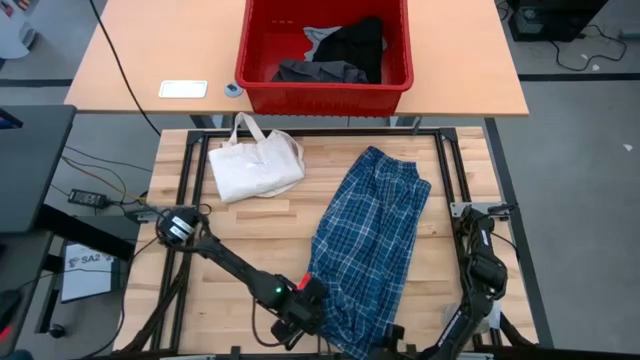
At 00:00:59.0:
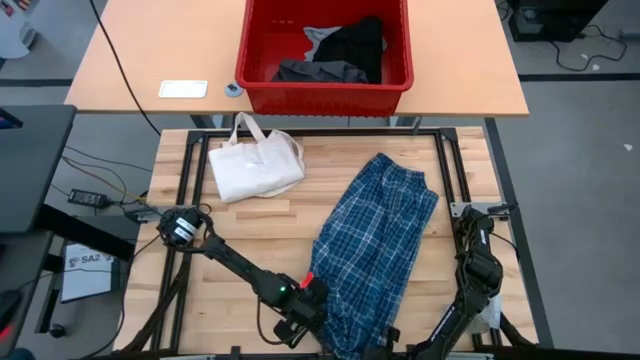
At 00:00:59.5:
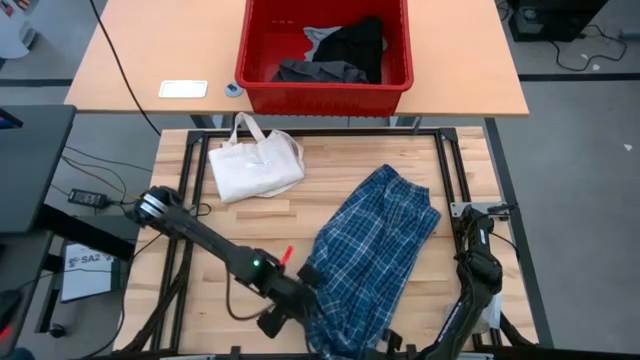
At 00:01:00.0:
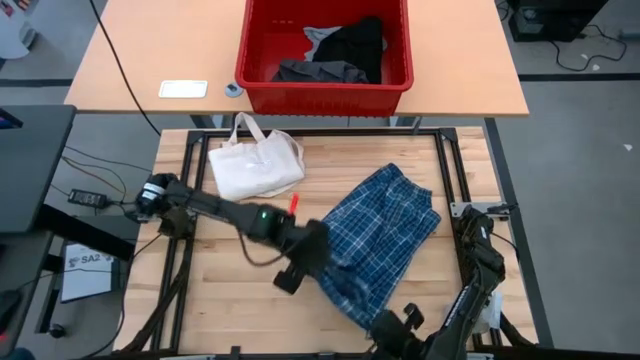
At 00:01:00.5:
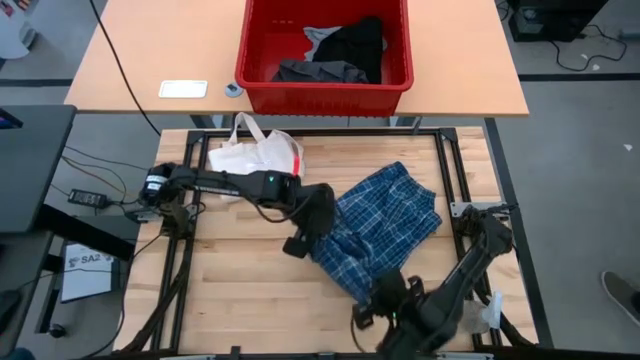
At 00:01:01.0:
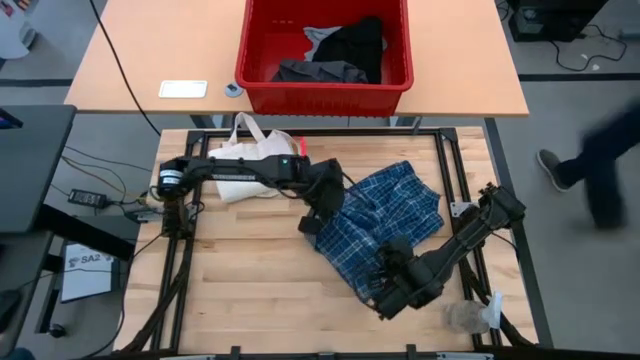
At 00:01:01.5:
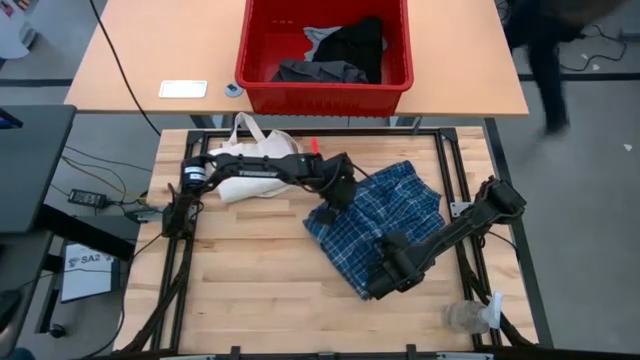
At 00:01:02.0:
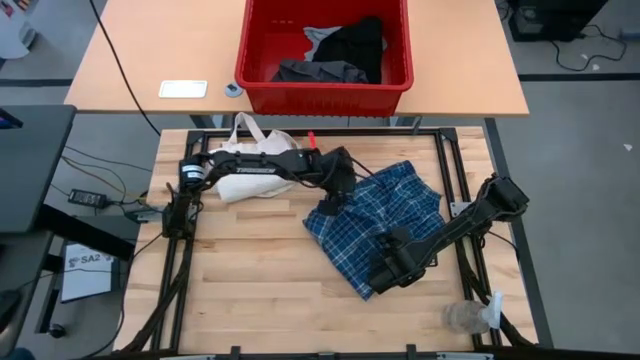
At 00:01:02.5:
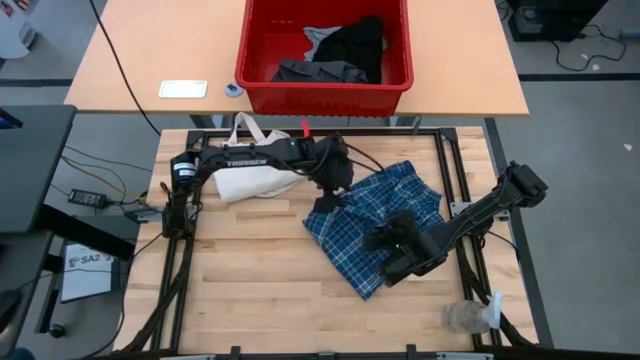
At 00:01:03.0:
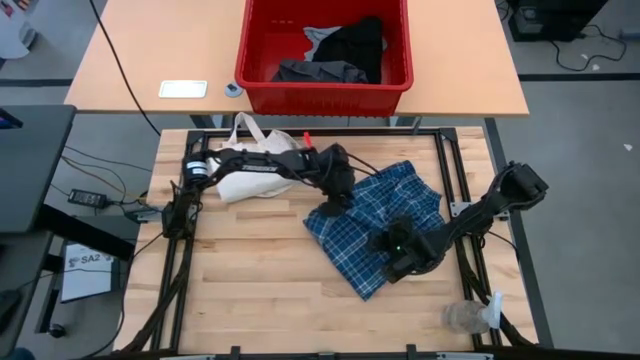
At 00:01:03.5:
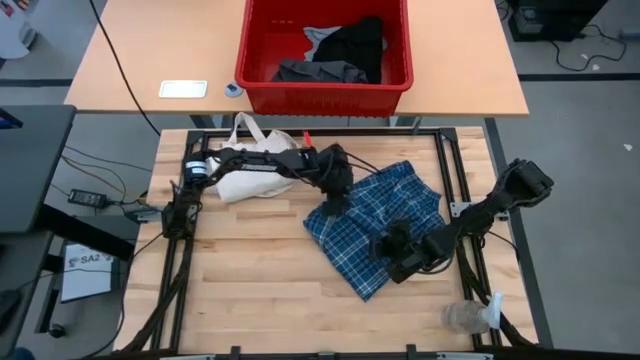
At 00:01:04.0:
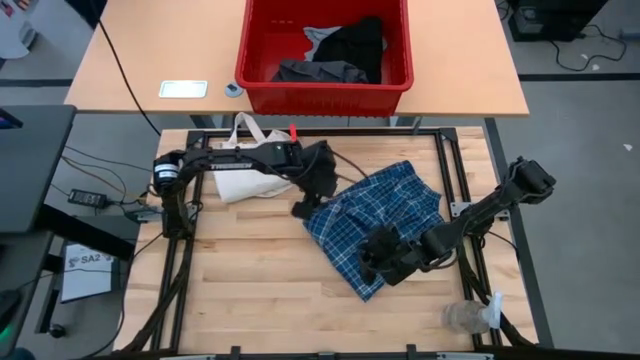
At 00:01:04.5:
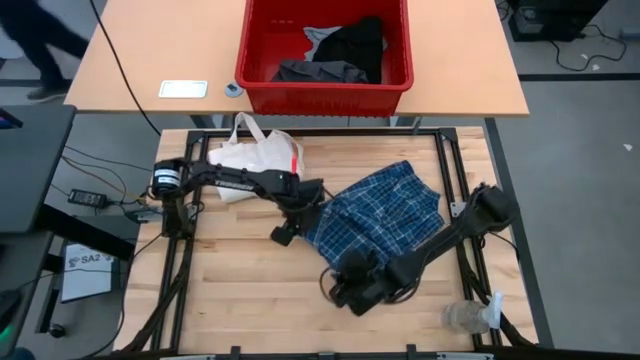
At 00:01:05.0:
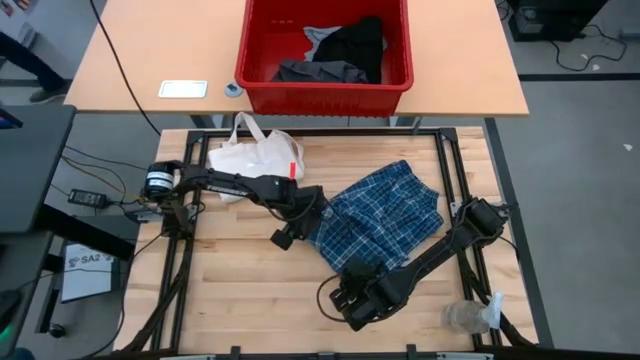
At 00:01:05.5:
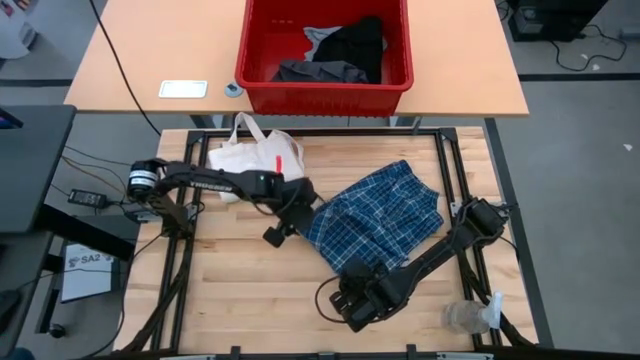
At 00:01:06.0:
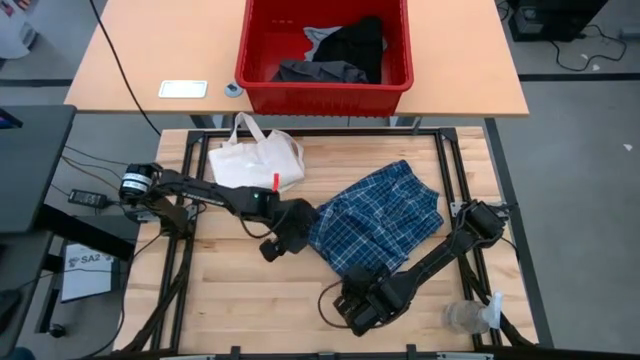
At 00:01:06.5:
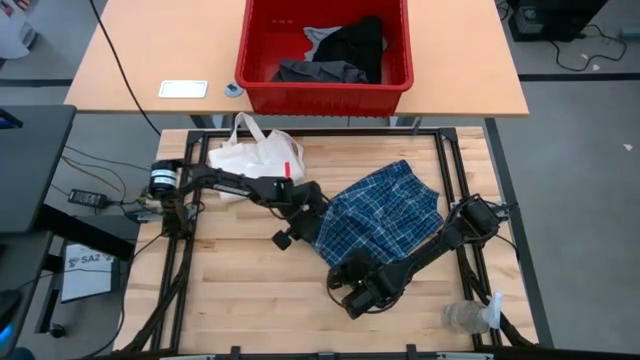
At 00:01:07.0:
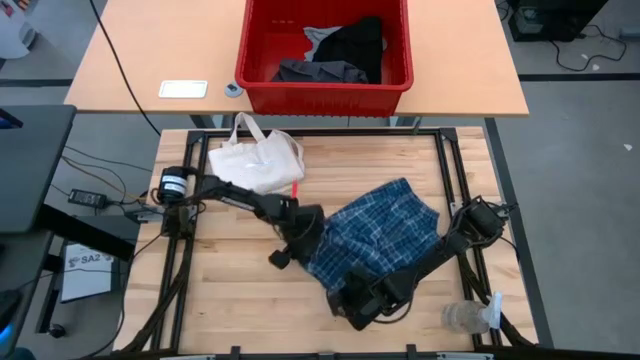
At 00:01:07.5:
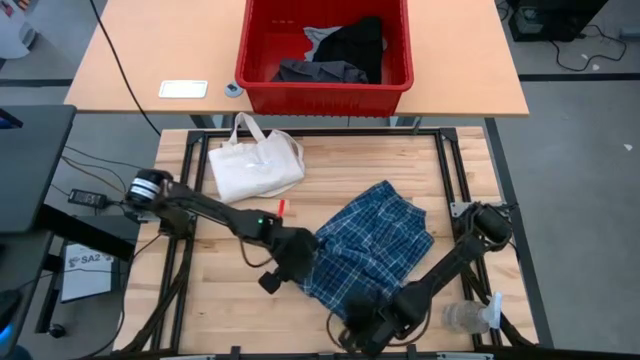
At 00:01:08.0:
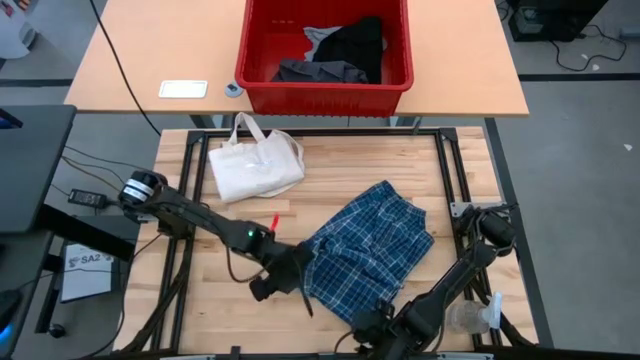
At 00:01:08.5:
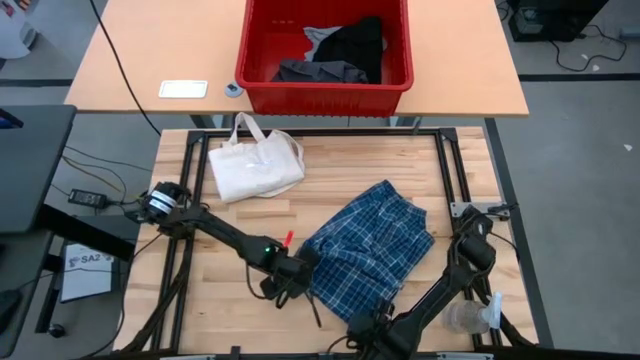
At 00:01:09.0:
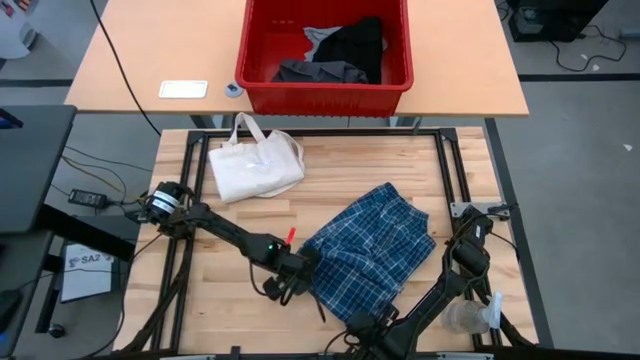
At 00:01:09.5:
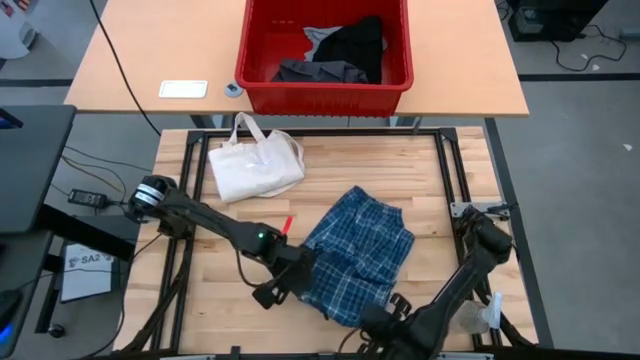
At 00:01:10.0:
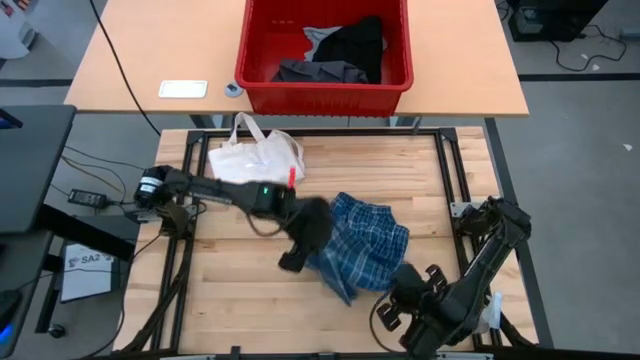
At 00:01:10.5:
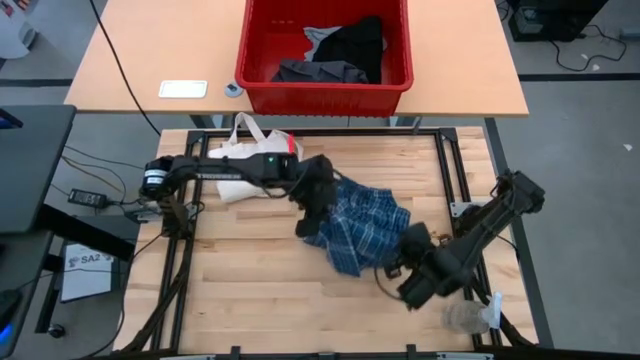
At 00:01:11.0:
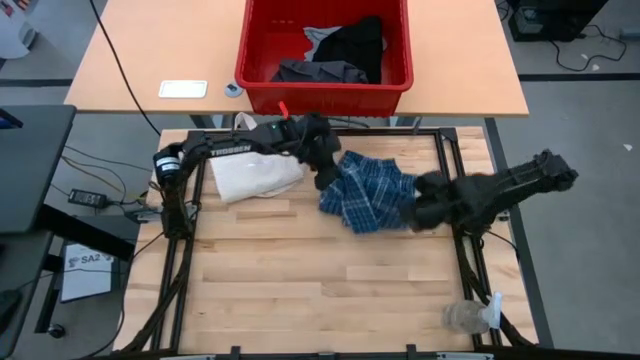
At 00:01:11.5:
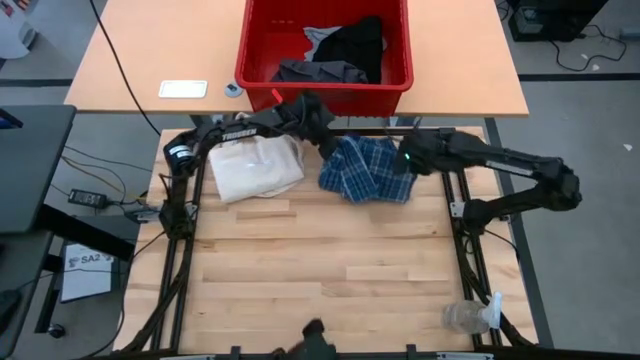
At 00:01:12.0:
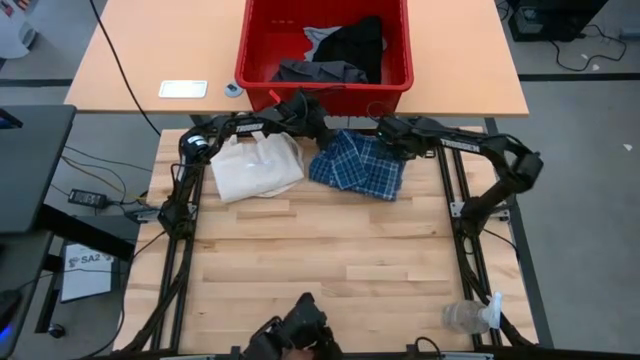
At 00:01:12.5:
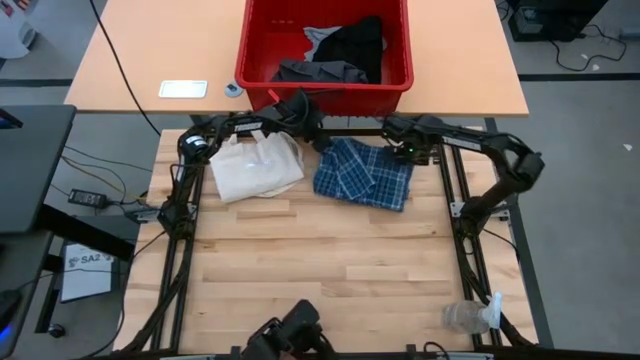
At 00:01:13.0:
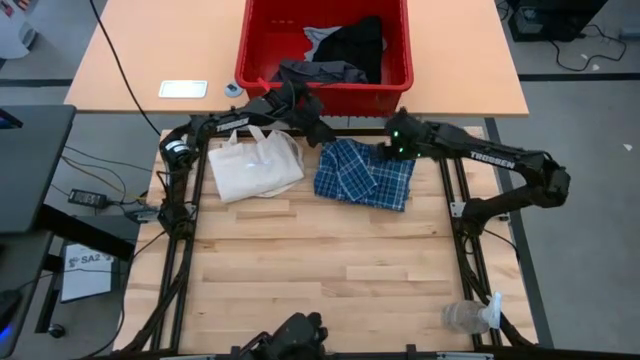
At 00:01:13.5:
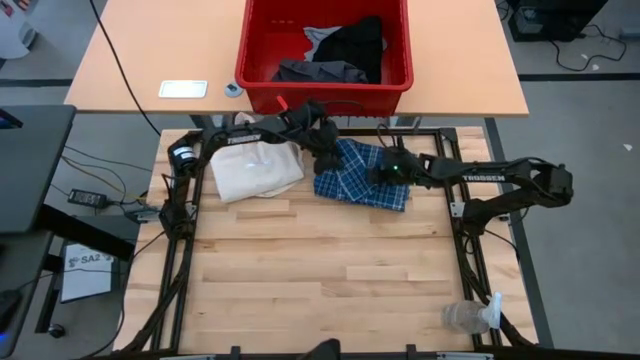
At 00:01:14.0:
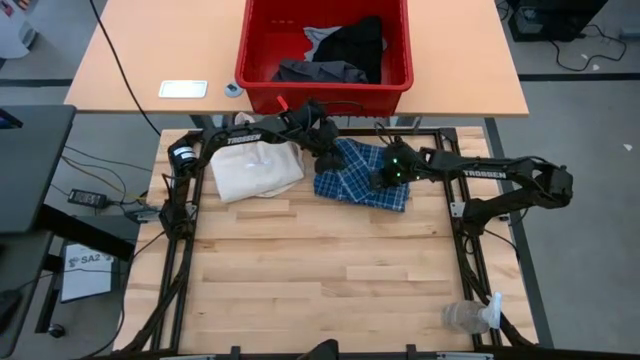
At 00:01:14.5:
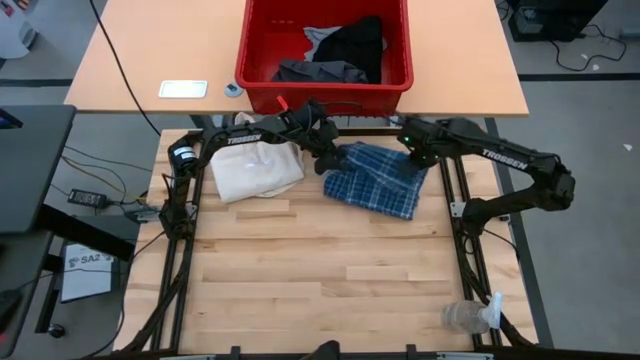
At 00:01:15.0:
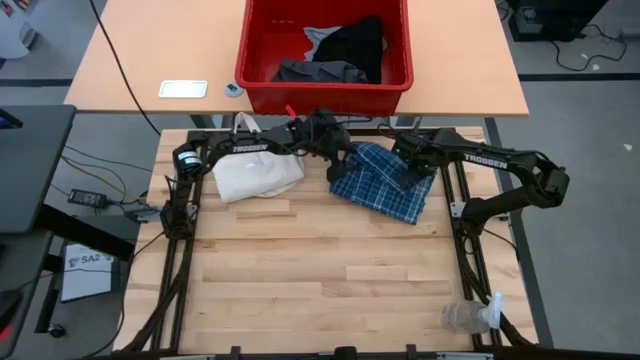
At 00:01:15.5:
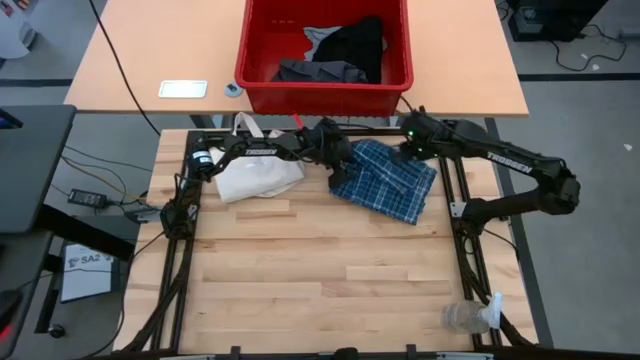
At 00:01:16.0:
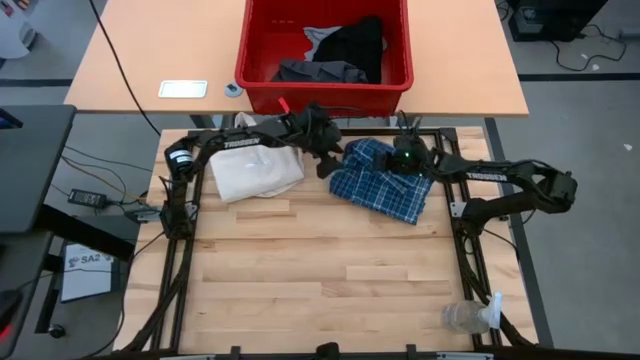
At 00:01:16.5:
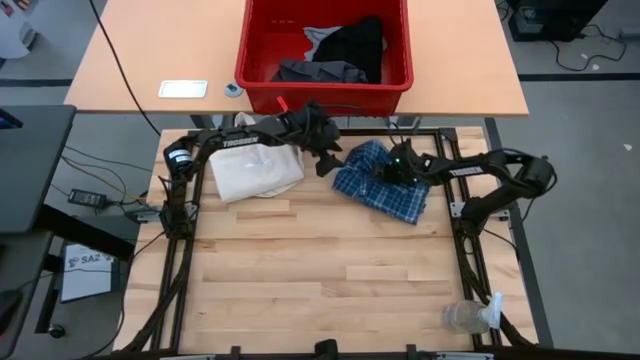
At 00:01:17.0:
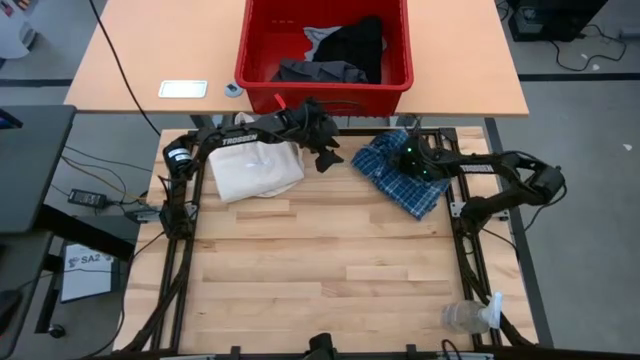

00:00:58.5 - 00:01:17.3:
Task: Fold laundry
Fold the blue pants

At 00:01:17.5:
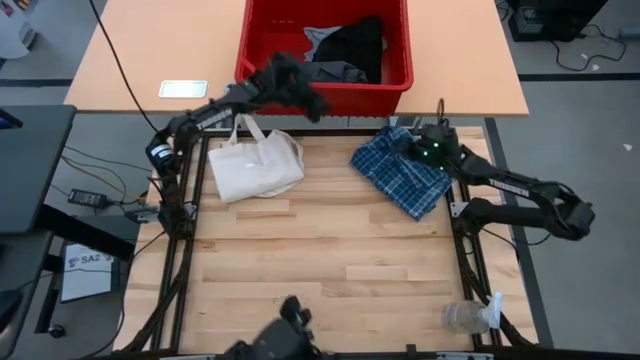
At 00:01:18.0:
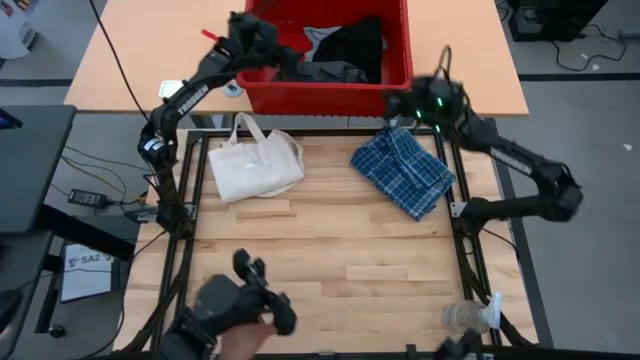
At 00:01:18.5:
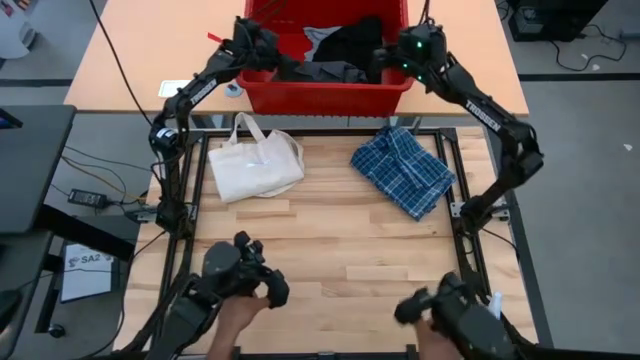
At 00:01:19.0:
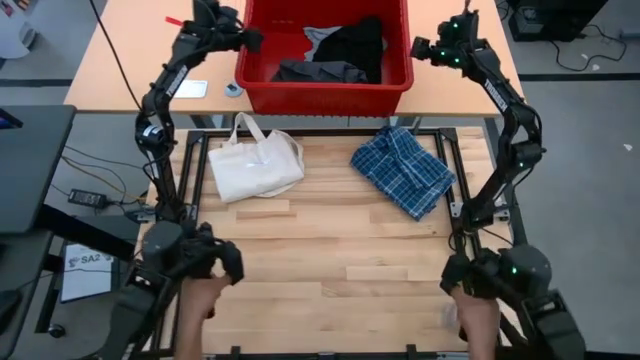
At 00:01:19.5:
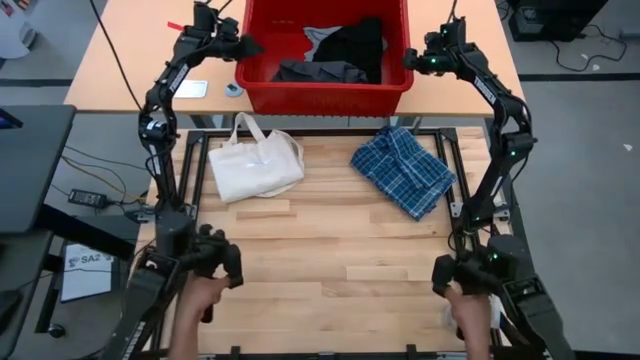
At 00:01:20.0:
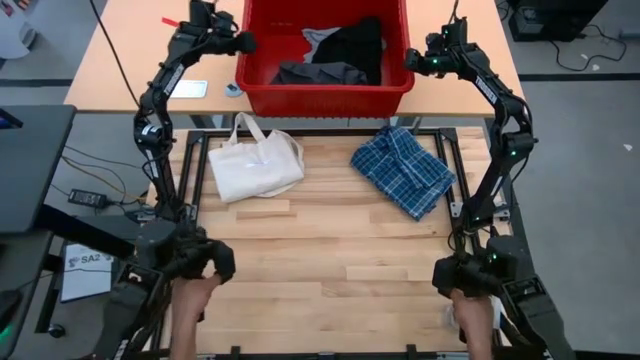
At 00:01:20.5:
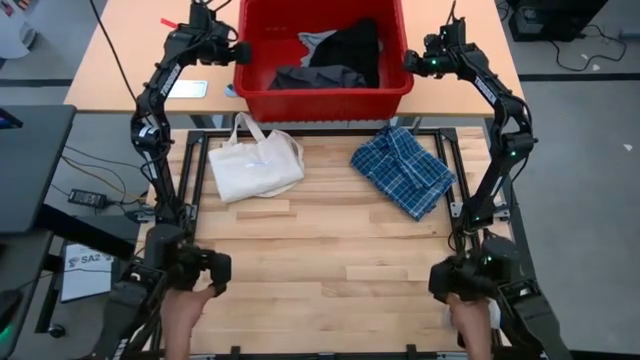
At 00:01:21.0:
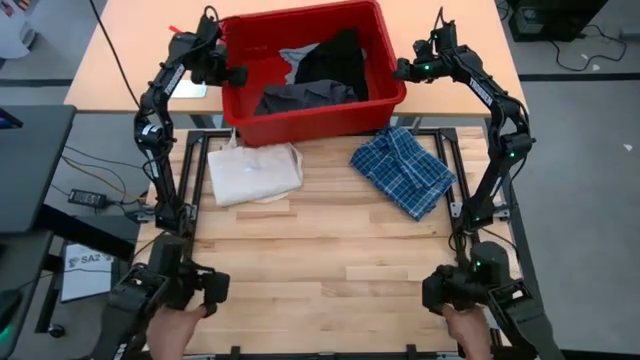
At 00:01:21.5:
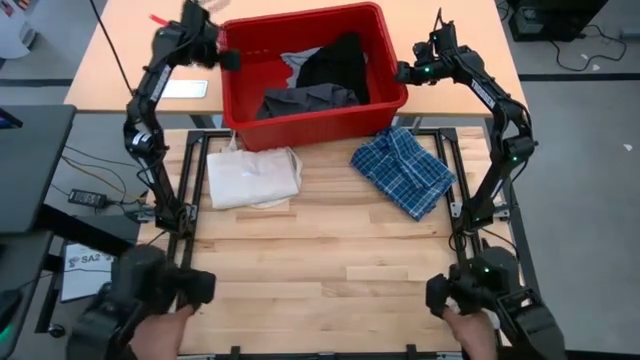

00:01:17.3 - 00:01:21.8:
Move the red bin to the top center of the table
